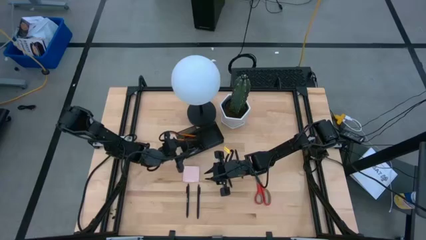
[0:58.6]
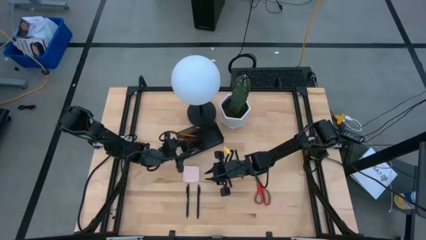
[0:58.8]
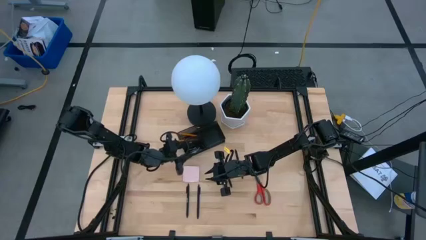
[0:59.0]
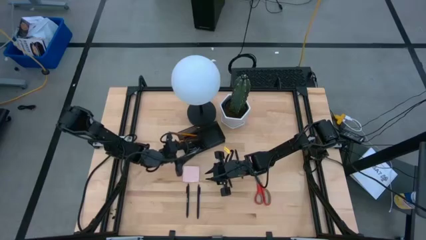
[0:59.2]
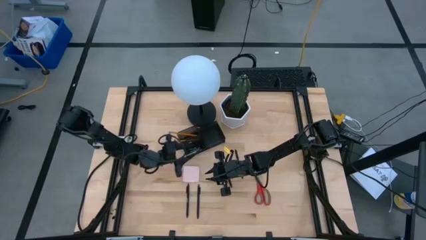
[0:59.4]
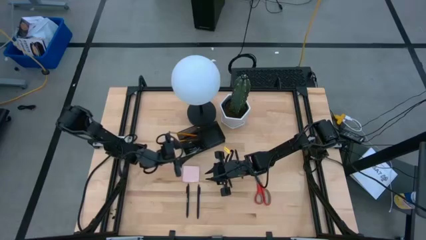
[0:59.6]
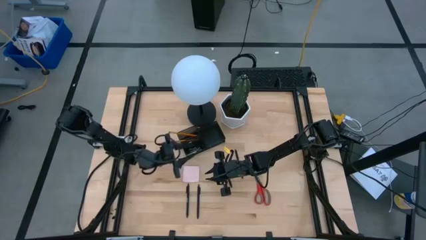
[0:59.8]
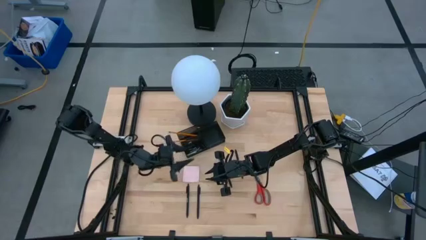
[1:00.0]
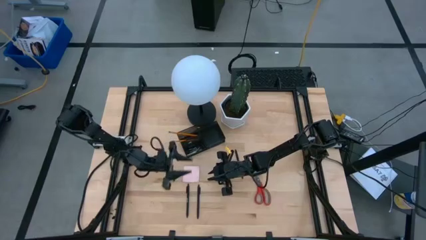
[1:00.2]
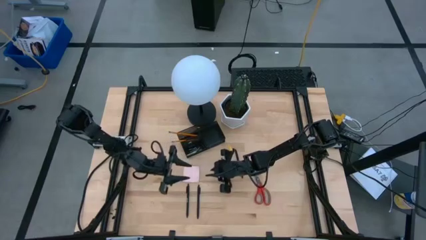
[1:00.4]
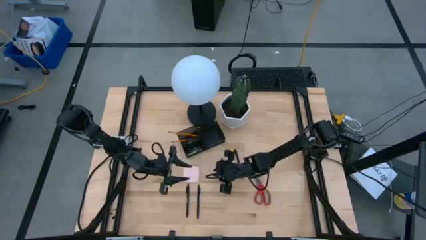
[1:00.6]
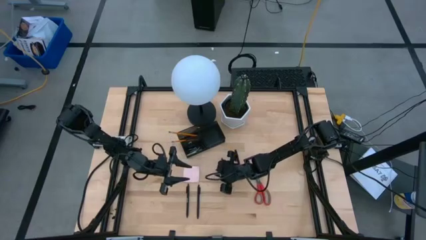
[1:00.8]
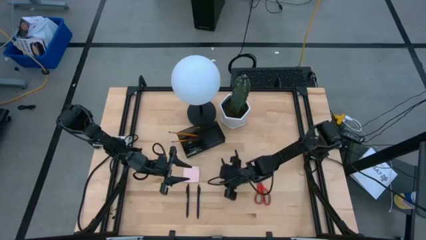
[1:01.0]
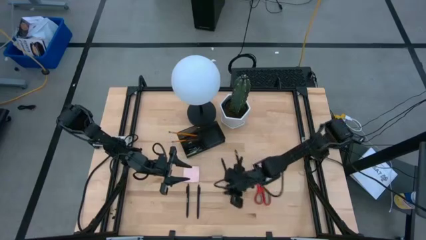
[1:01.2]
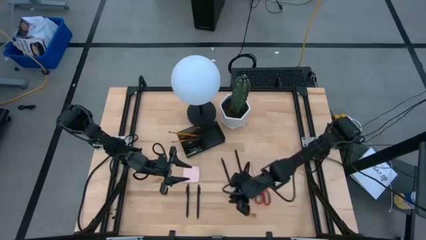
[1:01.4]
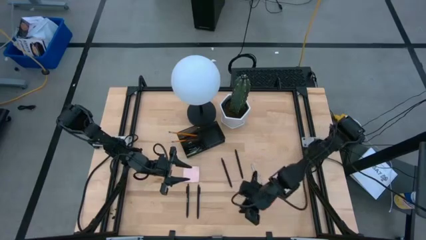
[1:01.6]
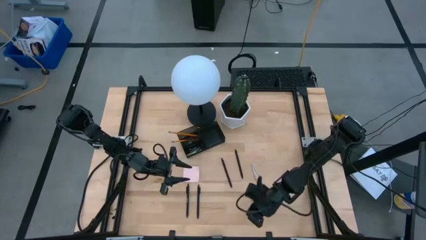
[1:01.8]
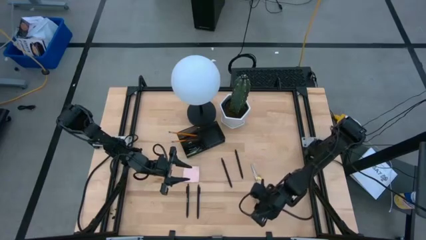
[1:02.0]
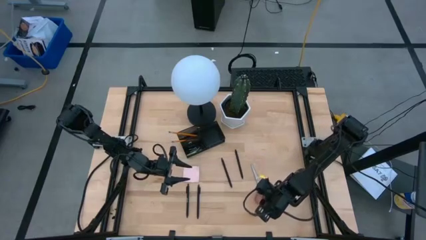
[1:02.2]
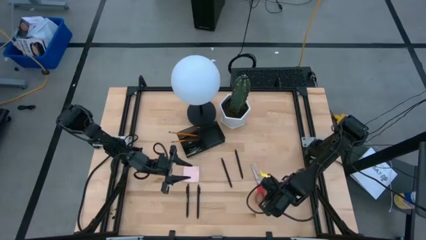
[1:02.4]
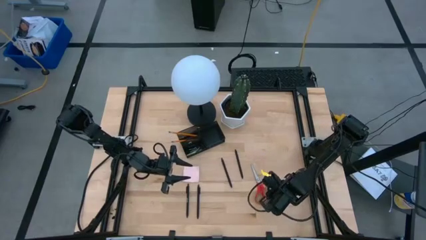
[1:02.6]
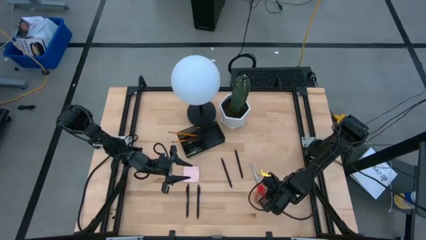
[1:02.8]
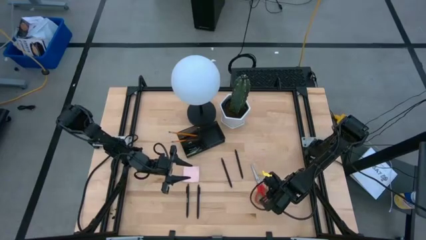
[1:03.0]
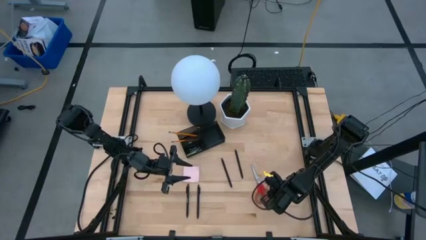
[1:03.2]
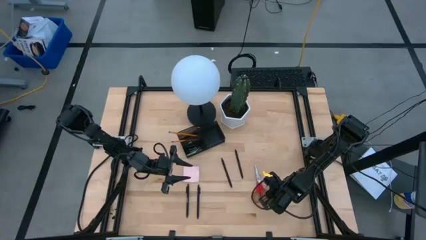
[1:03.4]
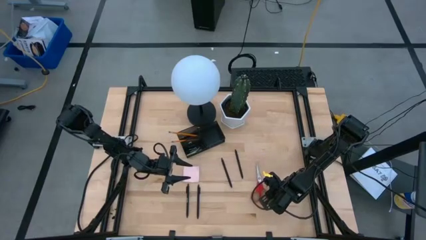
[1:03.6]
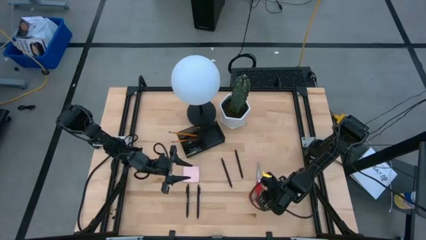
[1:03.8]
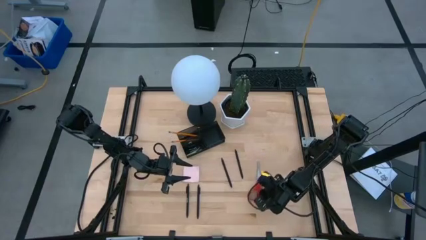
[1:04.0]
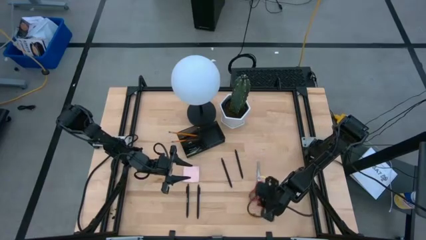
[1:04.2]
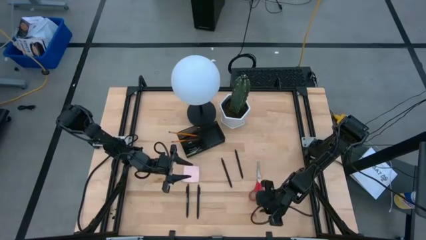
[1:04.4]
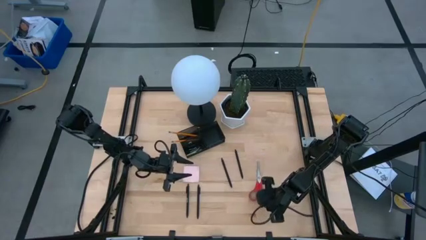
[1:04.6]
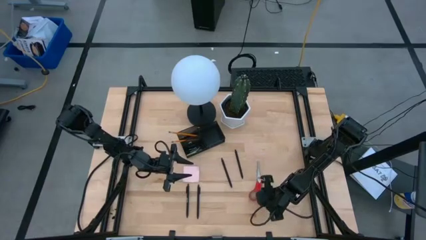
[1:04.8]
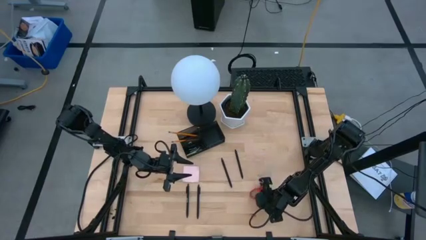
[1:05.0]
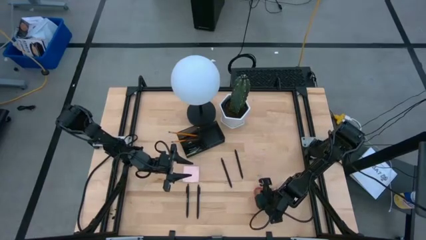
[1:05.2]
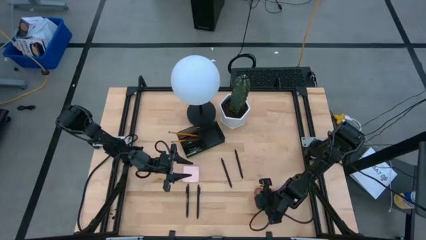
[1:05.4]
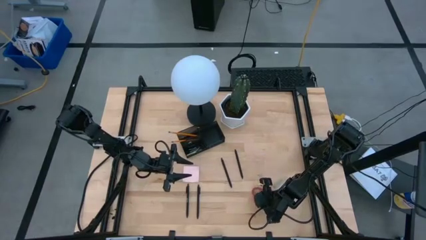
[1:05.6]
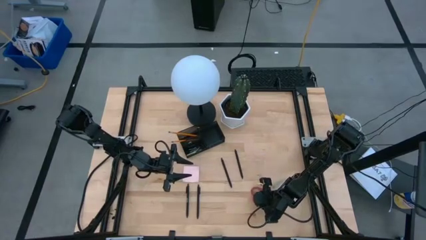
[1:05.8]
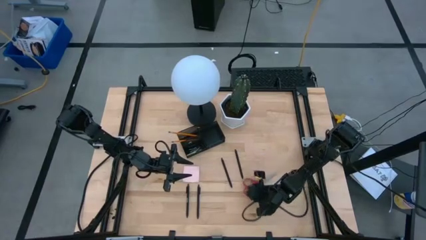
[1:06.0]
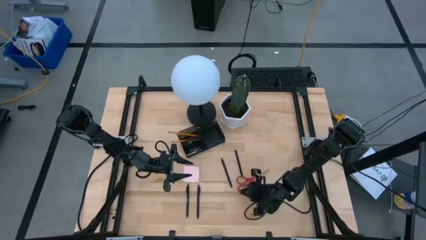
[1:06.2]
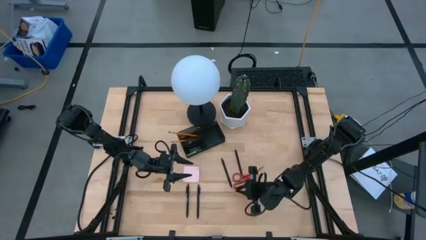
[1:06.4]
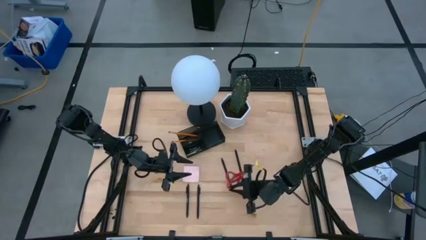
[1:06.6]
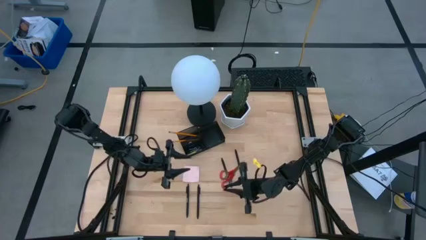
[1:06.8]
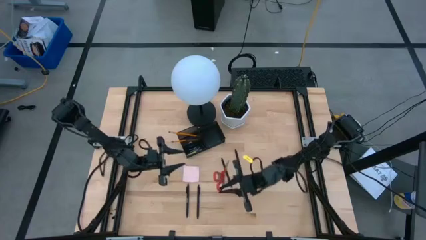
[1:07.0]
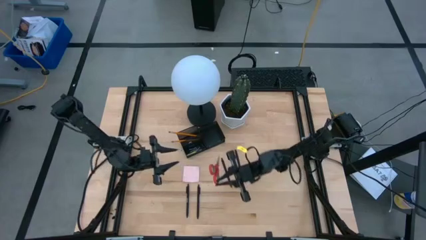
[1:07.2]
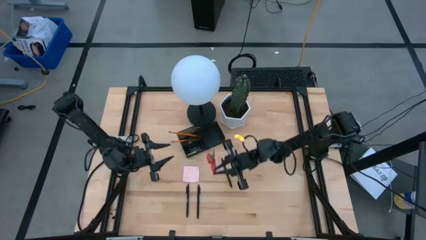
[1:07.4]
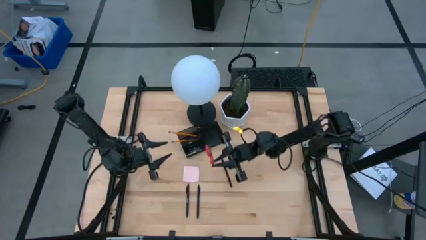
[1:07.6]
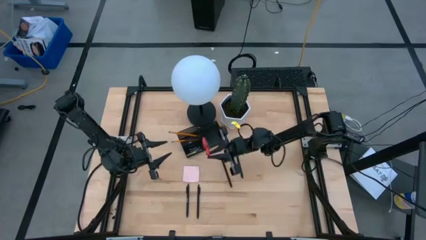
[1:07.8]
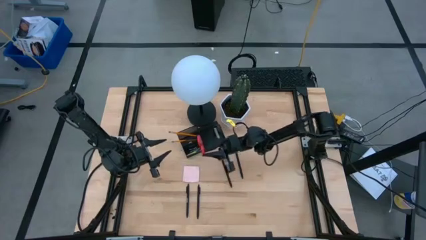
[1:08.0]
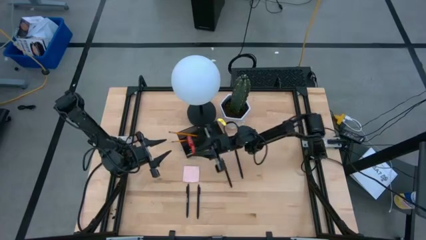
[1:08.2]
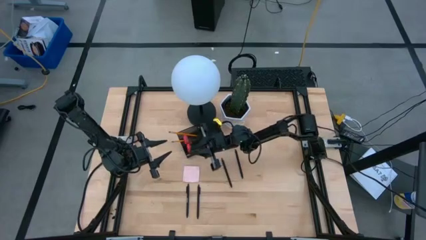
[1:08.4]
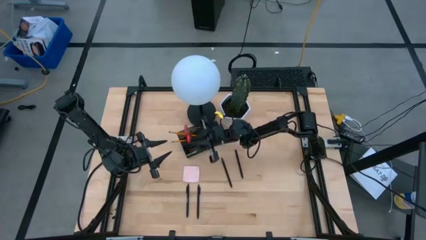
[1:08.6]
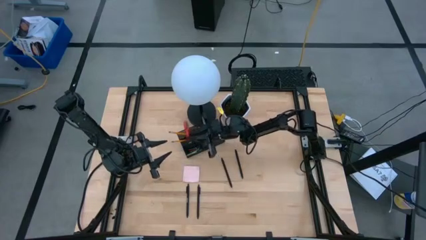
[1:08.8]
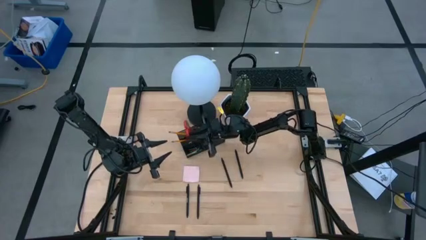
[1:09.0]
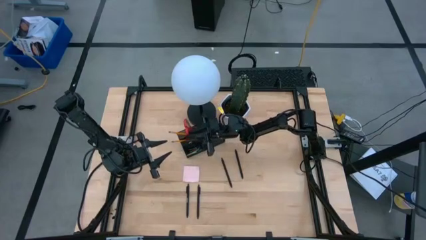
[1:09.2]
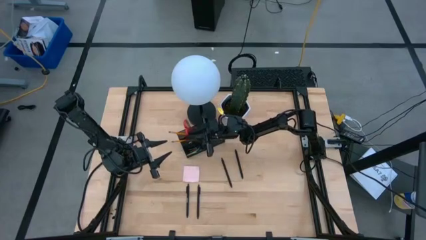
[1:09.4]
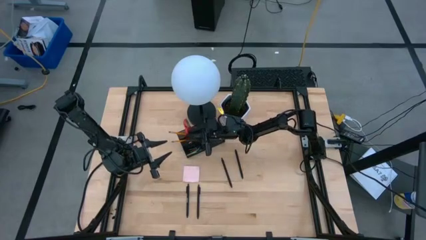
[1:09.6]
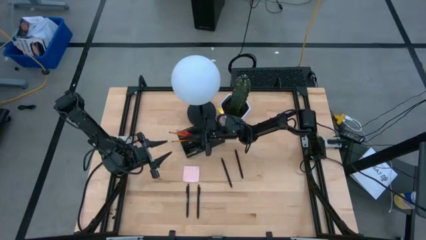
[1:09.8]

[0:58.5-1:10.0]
Task: Pick and place office supplies into organizer
Put the red scissors into the desk organizer

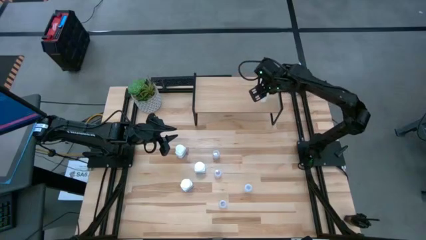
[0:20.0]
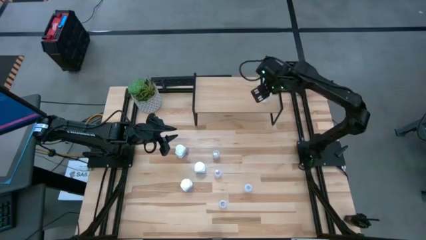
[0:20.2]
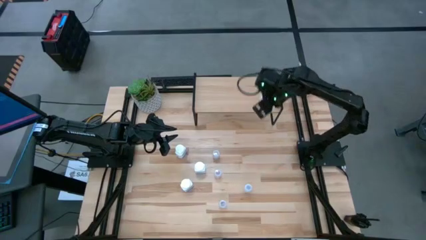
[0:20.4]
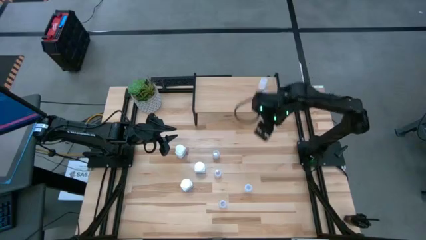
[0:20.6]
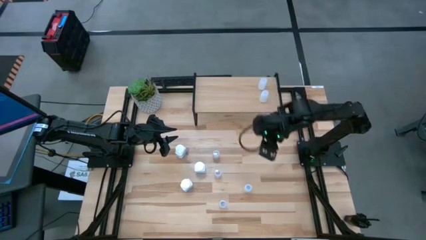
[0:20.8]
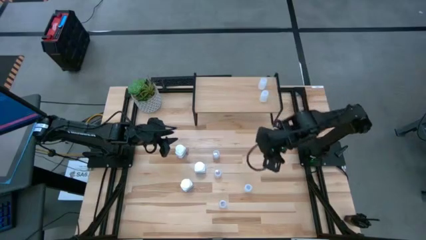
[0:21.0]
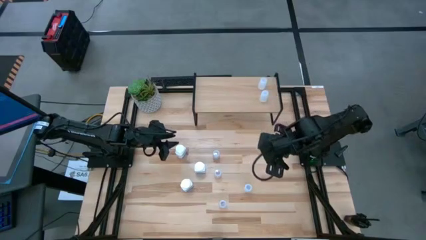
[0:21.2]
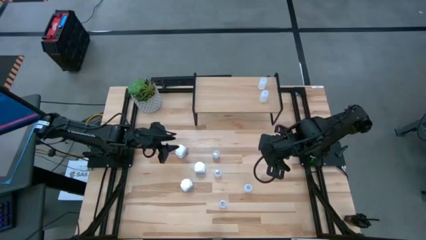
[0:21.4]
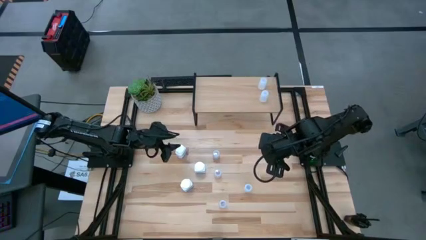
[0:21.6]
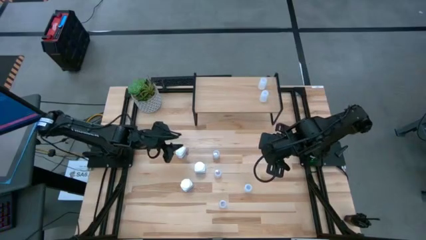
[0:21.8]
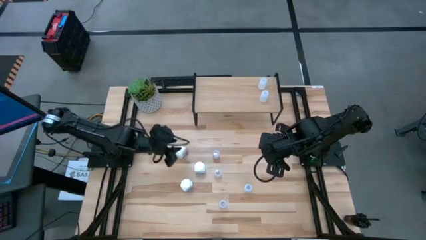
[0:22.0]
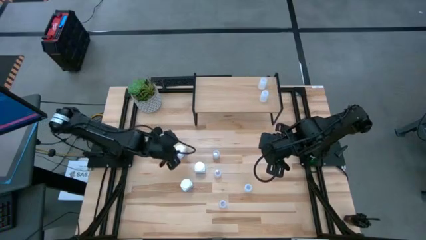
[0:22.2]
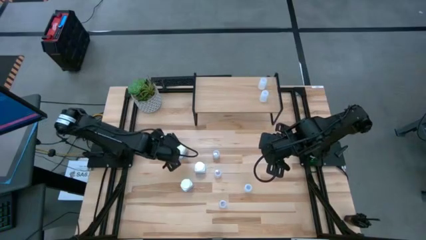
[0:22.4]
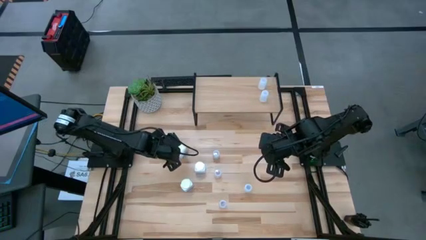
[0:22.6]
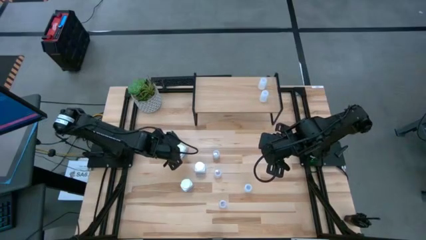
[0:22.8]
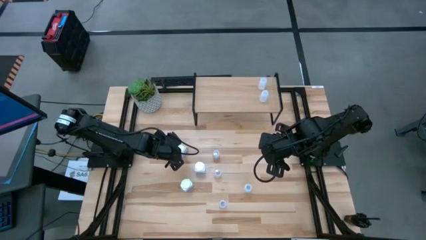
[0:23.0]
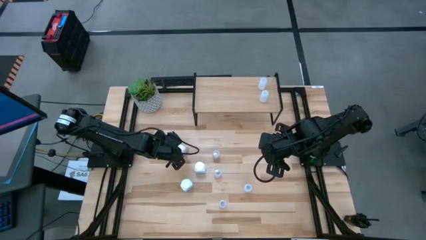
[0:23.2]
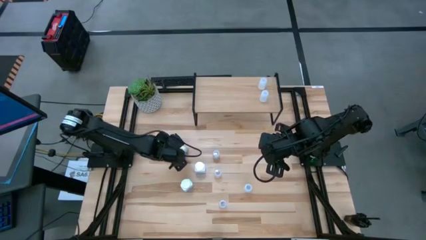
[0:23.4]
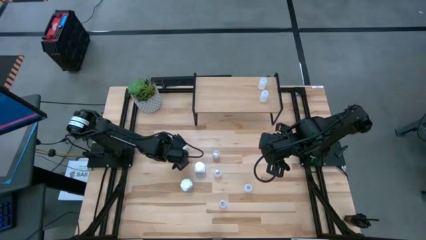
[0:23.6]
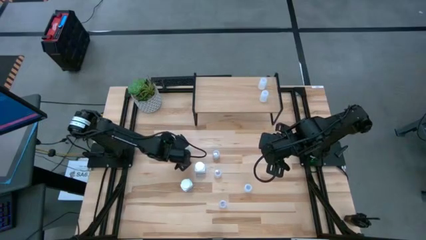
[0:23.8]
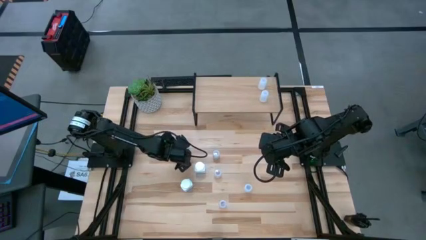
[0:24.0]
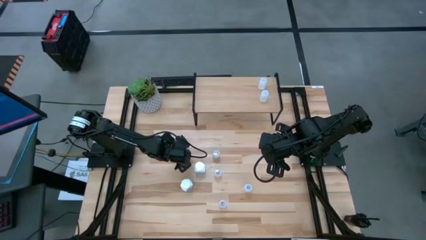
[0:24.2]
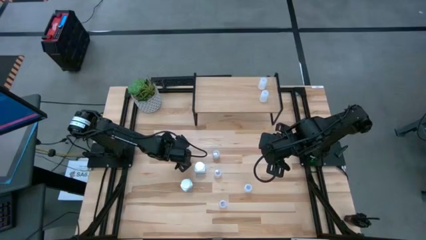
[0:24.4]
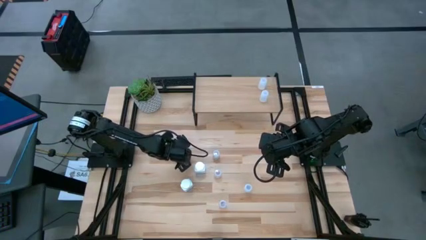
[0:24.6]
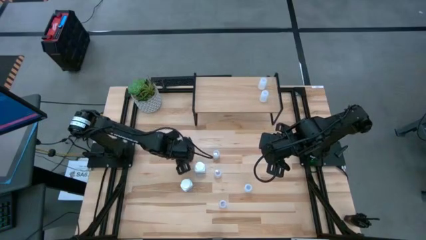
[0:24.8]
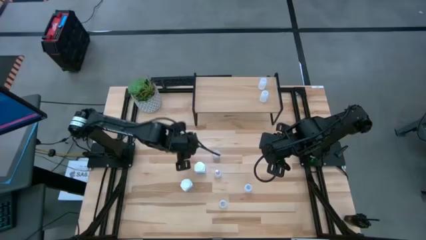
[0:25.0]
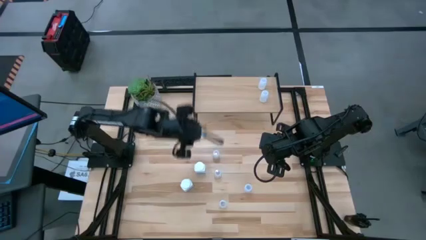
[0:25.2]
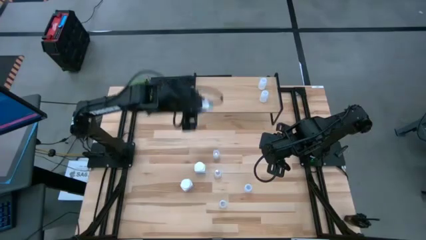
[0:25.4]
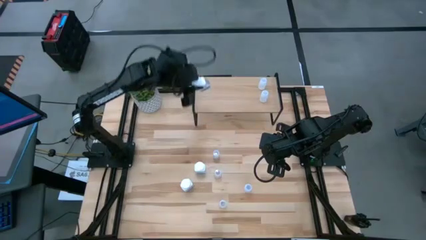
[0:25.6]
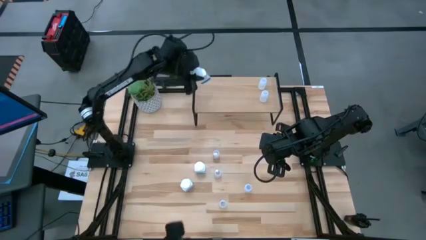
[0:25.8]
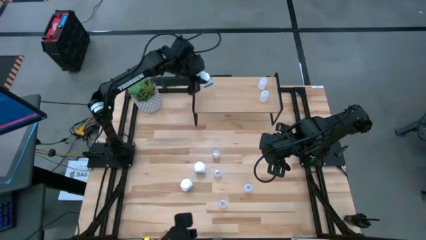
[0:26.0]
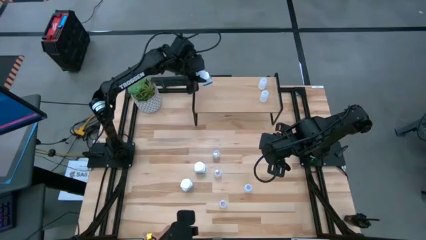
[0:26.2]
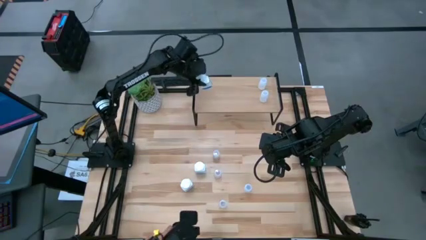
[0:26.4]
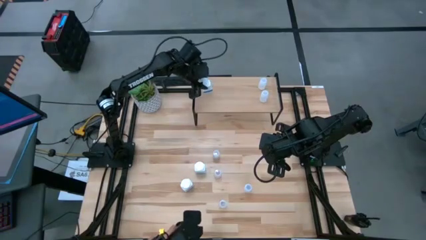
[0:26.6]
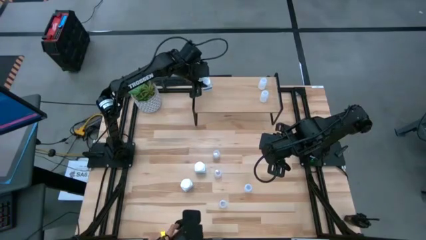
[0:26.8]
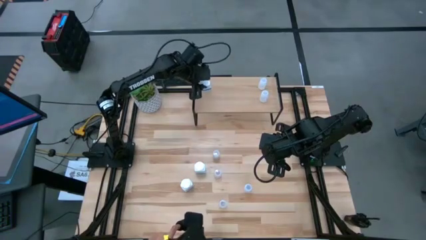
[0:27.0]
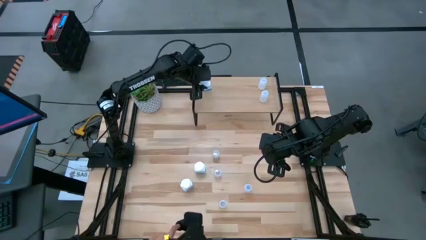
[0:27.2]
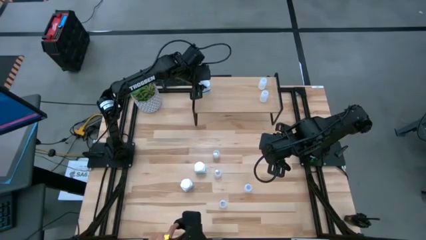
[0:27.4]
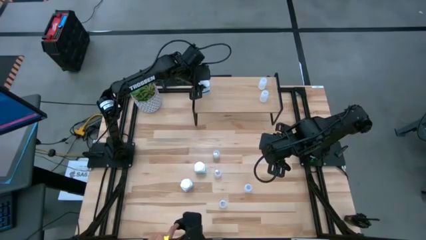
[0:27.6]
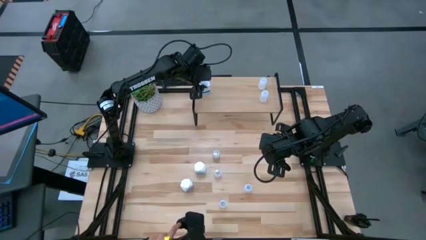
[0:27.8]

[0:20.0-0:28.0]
Task: Pick and place medicine bottles onto shelf by color
Put the top left big white pill bottle on the shelf
